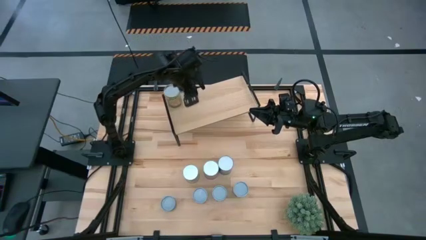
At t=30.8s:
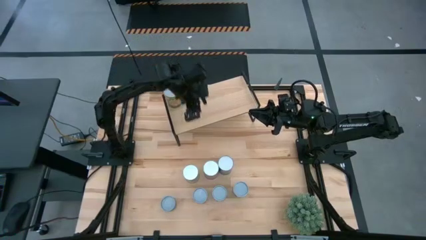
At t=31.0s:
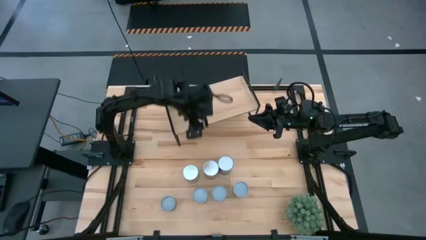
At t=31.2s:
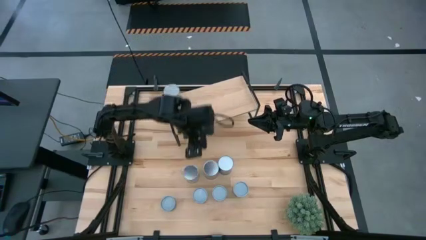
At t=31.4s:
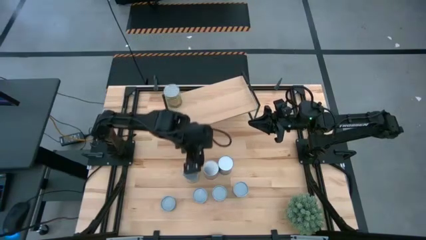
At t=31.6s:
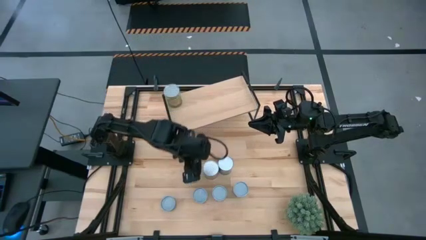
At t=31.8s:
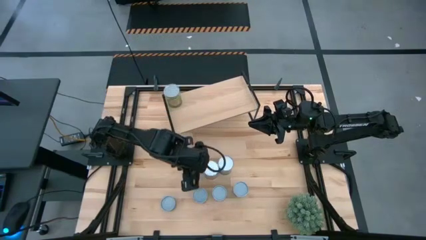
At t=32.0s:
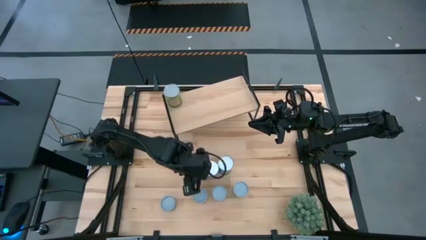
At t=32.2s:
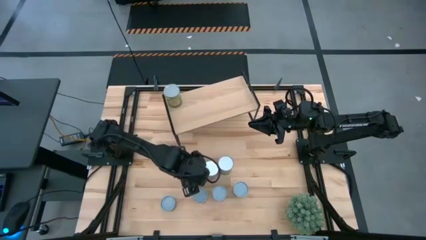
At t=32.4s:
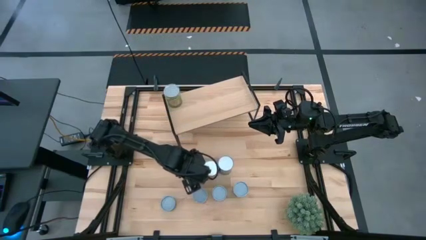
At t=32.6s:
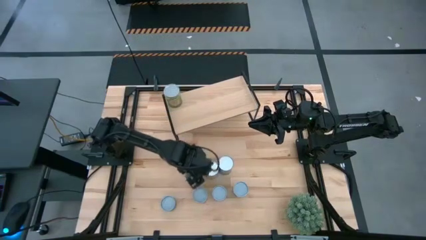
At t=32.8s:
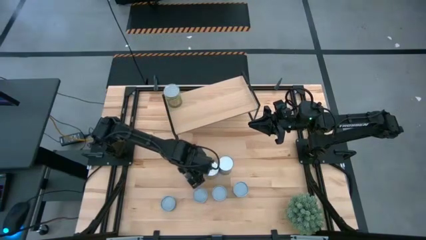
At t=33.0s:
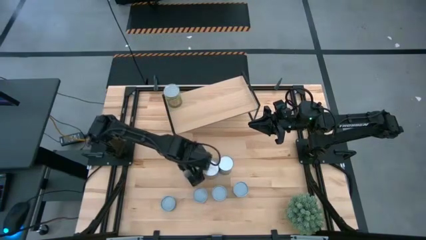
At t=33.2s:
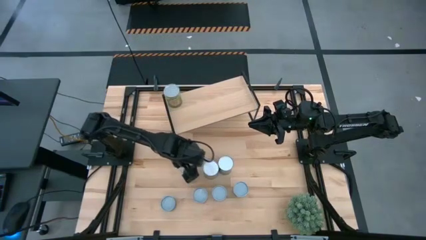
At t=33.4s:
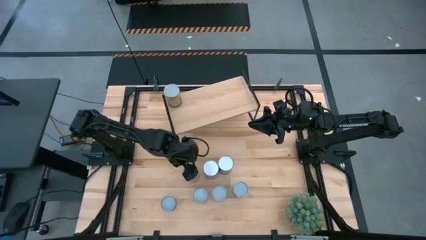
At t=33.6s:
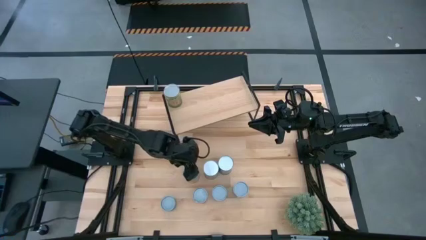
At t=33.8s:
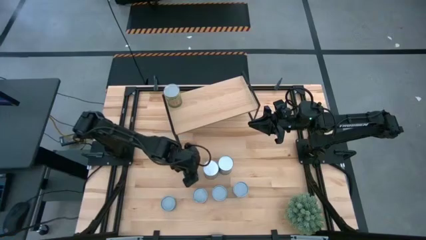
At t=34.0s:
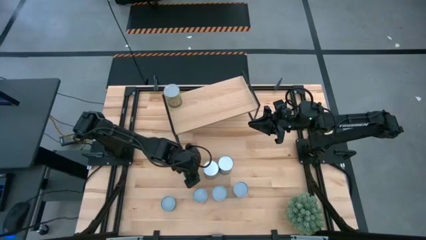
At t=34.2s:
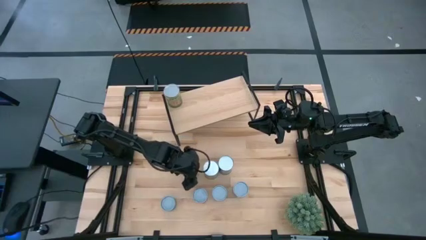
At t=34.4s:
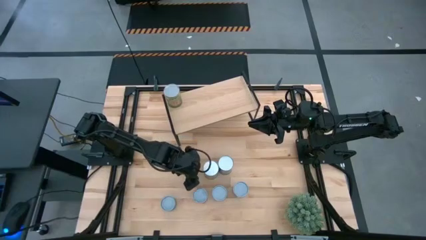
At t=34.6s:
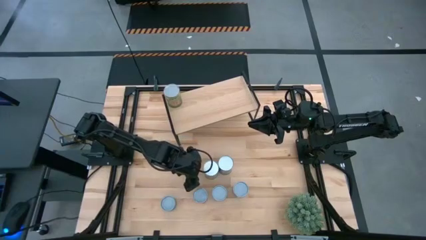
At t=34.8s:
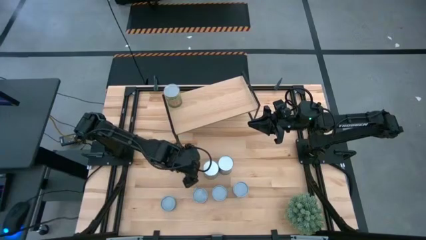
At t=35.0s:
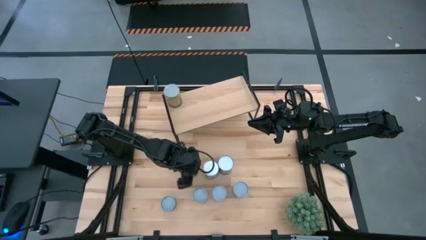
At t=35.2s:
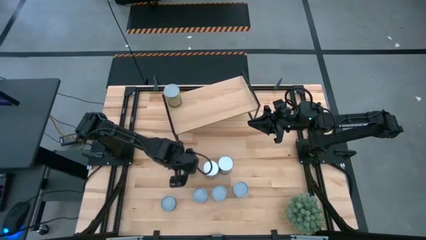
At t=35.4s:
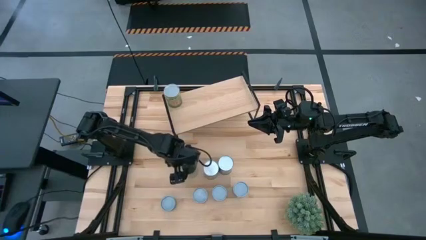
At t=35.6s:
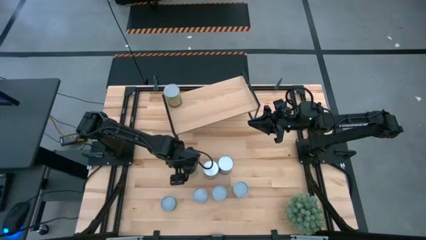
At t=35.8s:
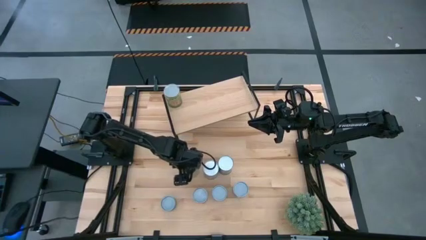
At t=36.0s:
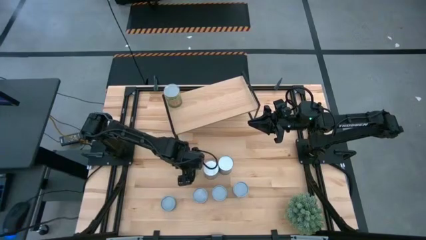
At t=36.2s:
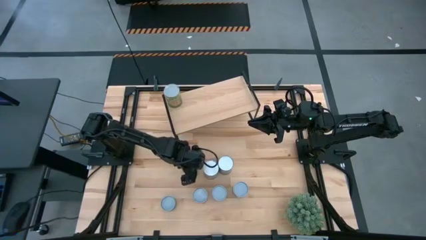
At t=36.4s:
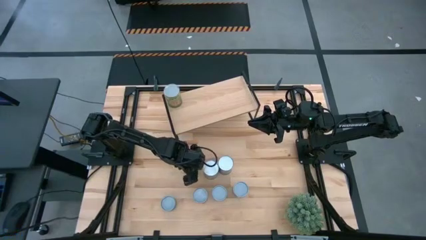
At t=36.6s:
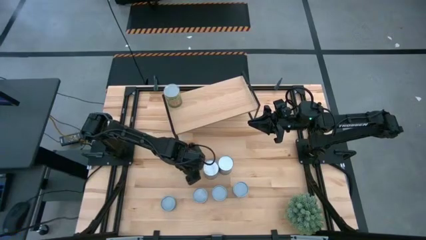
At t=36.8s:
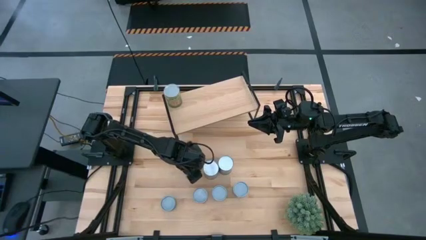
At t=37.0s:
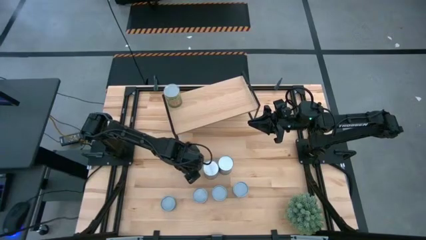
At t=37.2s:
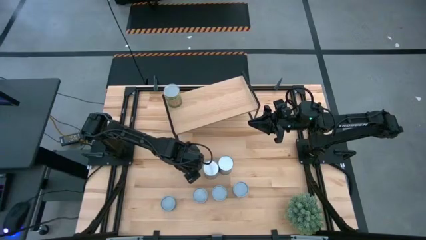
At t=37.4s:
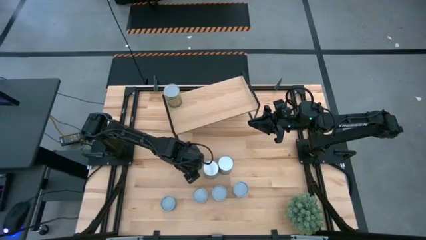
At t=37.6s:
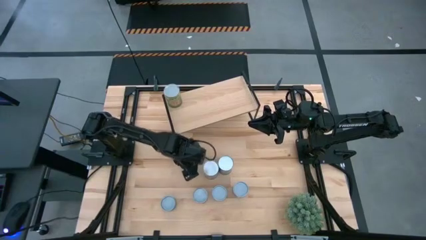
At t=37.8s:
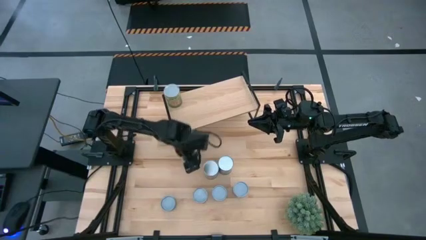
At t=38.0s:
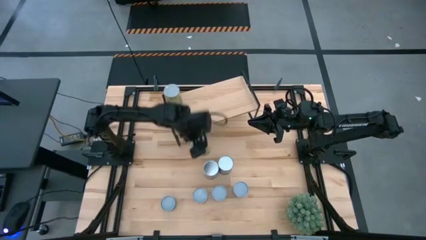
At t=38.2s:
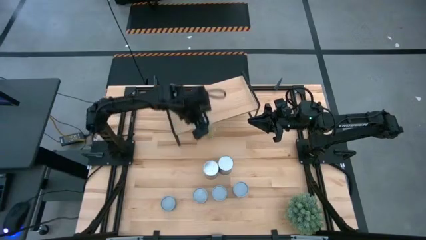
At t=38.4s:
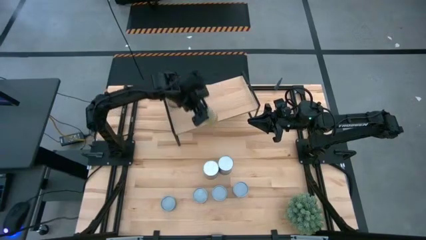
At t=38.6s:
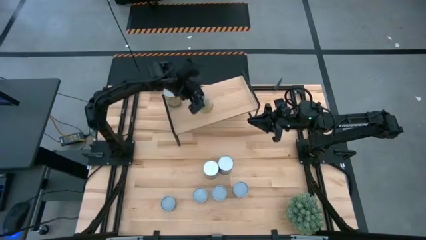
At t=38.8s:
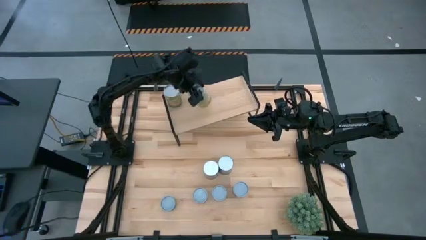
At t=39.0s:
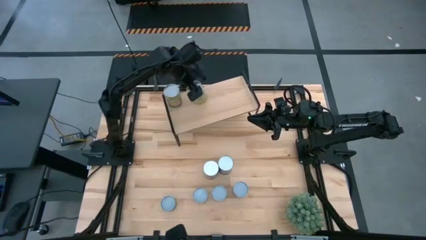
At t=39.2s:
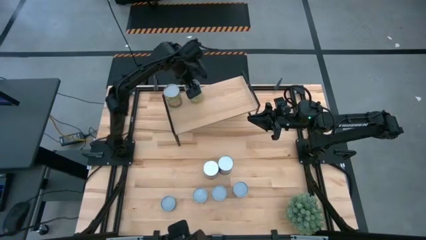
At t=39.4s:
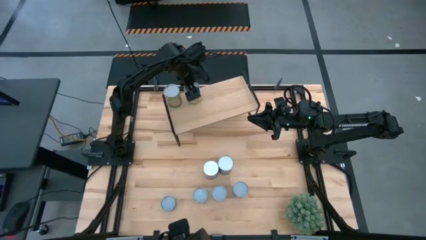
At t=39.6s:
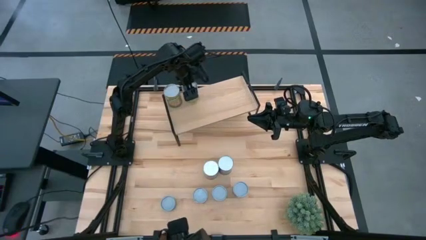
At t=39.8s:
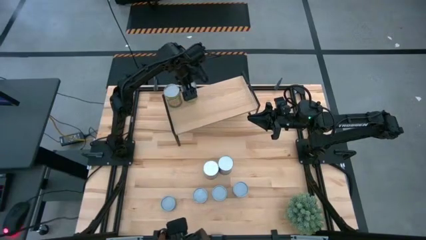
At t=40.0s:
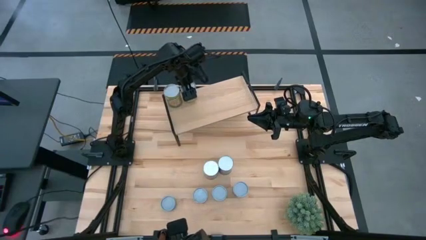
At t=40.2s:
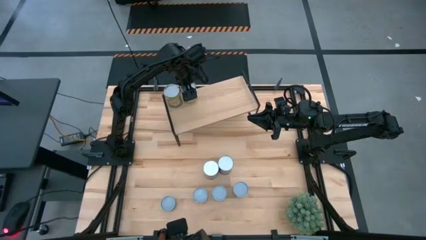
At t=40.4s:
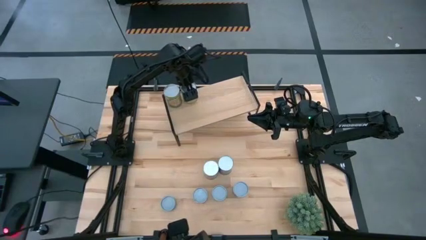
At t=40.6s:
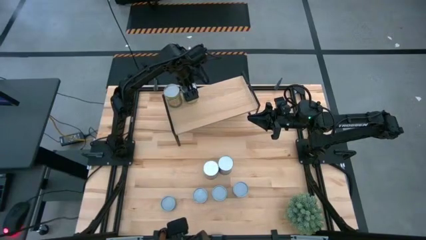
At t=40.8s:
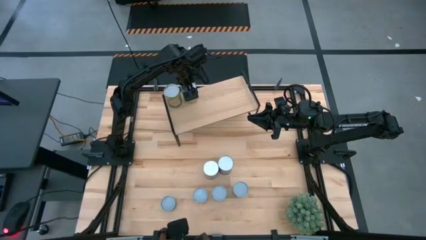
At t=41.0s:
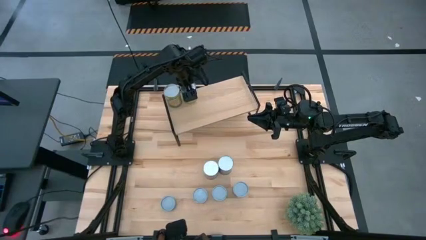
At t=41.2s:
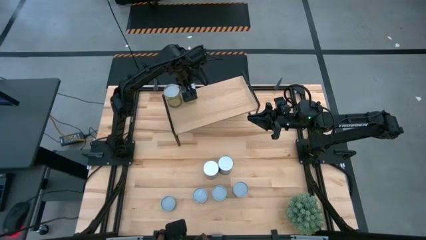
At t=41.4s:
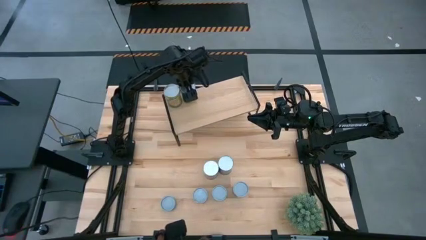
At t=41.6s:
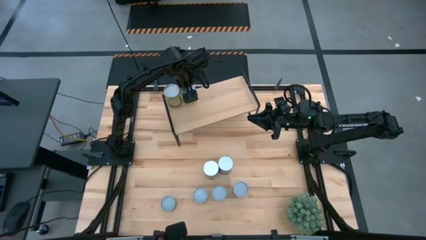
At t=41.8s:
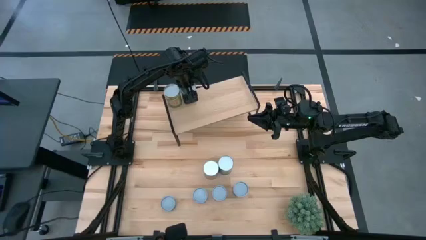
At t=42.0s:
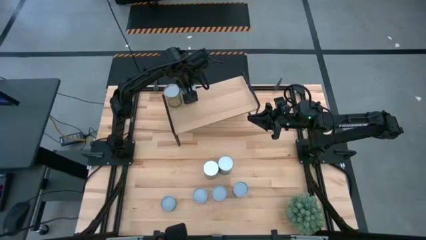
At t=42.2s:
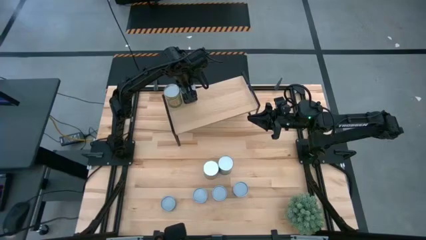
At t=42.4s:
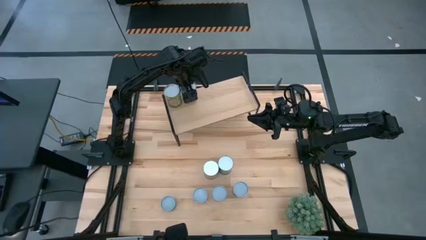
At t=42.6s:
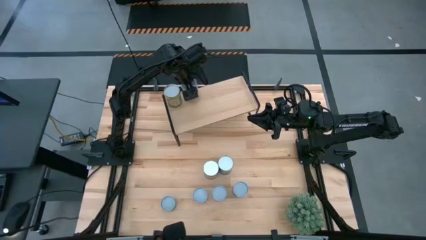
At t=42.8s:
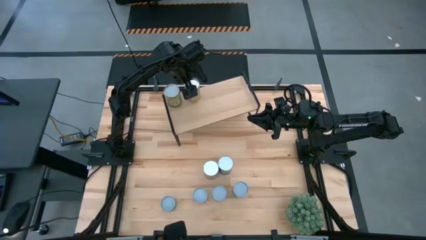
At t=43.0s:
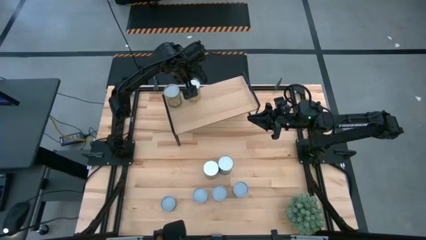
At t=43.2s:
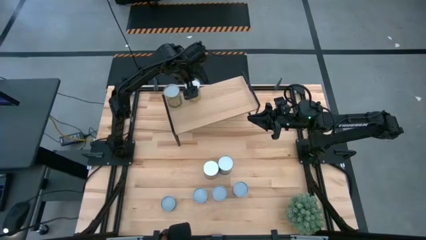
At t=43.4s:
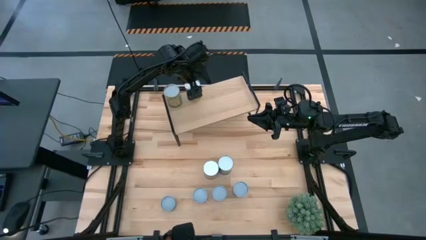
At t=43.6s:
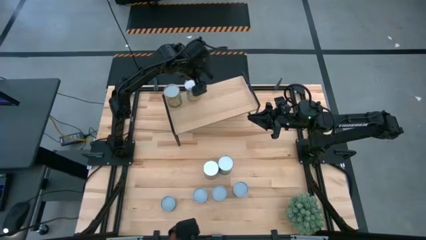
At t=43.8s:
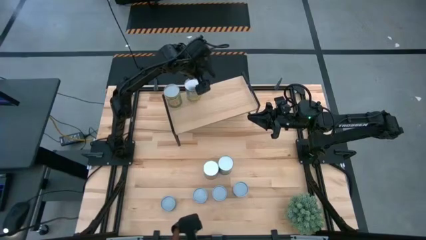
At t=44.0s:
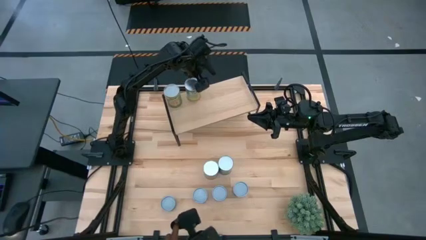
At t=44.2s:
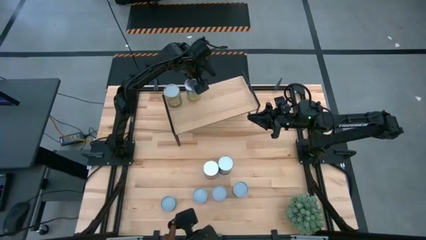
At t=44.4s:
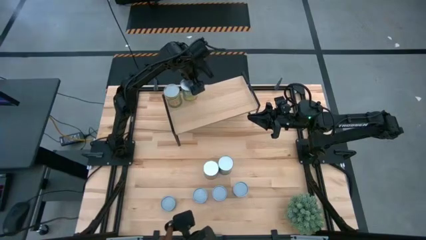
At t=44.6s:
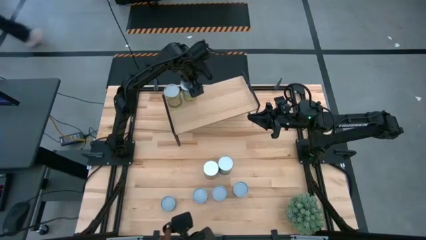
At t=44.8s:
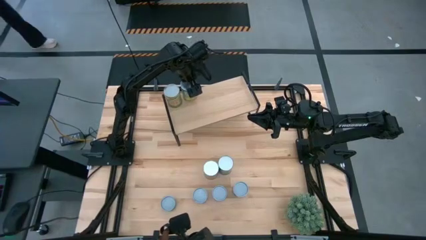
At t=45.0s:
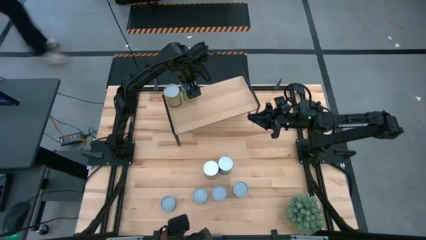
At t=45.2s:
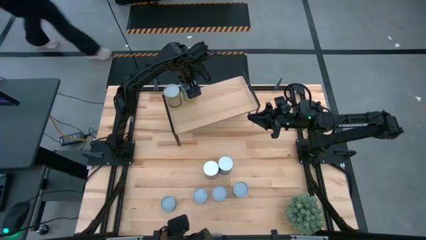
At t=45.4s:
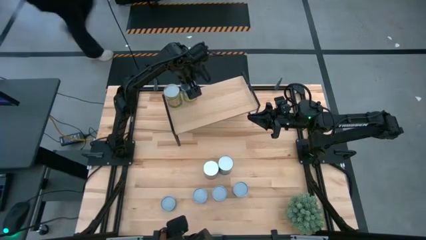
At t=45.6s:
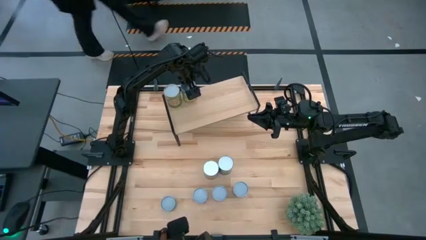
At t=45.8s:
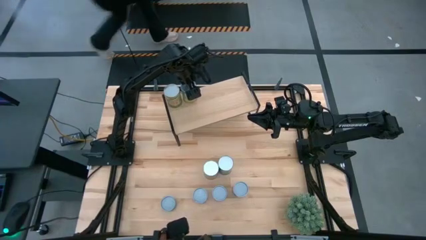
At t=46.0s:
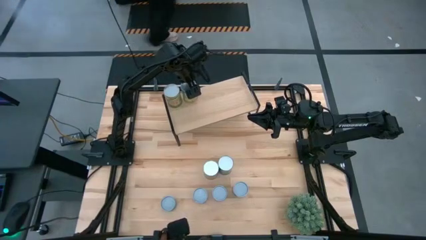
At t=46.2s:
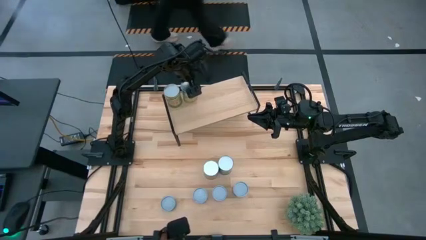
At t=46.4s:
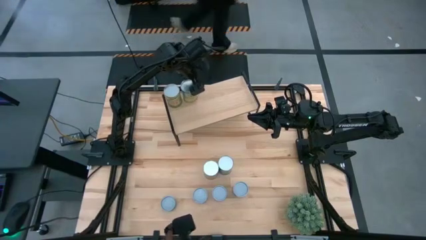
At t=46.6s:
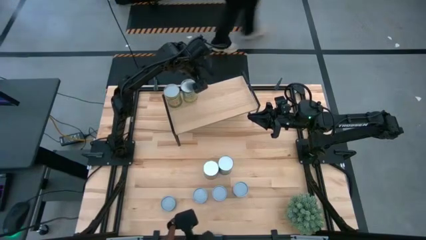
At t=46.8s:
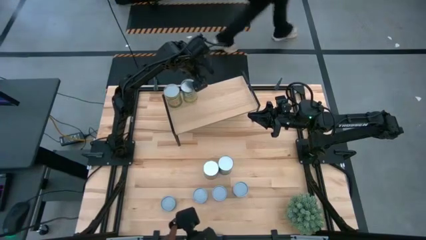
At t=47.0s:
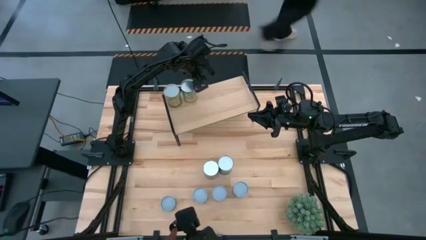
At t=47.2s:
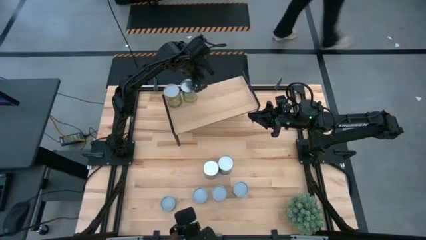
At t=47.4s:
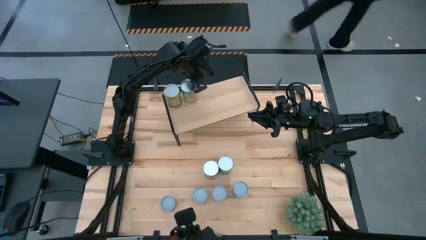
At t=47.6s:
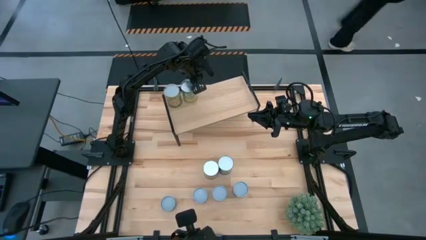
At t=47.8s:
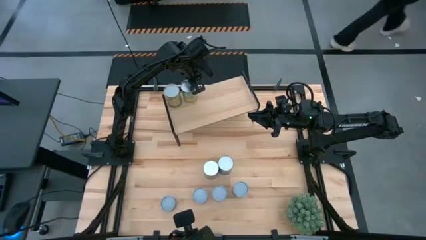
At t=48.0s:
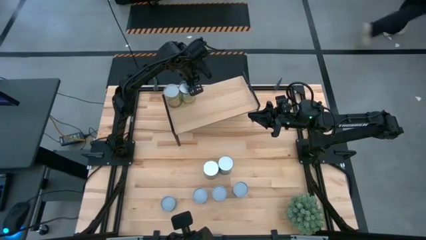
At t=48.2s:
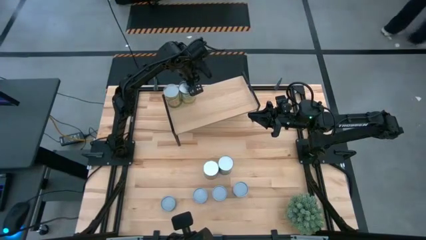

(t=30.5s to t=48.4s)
Task: Pick and place cans onto a shelf
Put the canned carrots on the shelf
